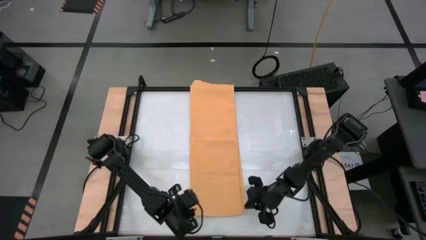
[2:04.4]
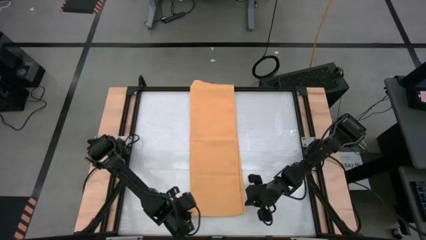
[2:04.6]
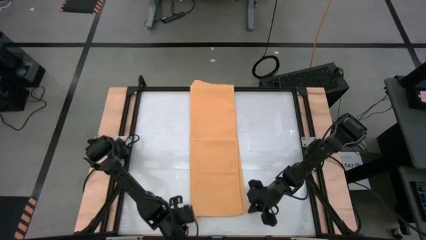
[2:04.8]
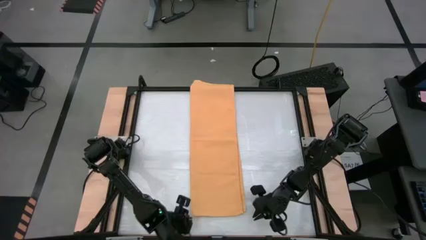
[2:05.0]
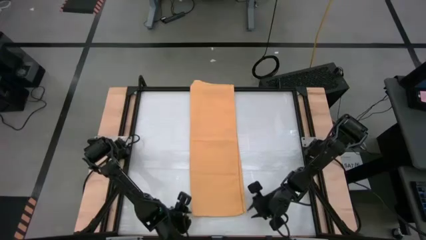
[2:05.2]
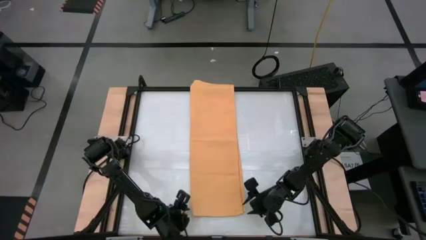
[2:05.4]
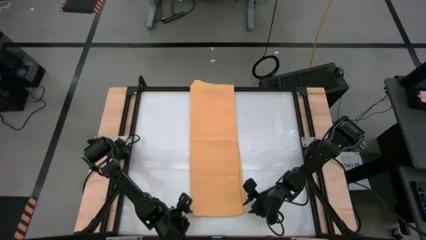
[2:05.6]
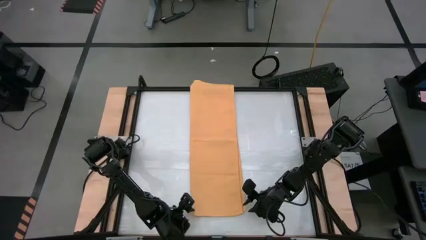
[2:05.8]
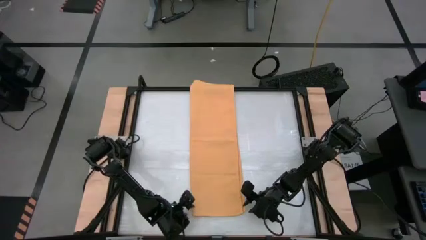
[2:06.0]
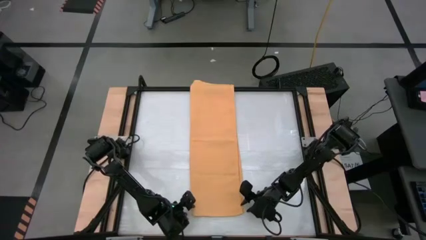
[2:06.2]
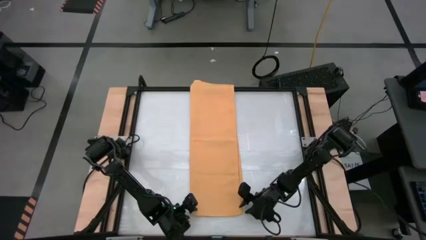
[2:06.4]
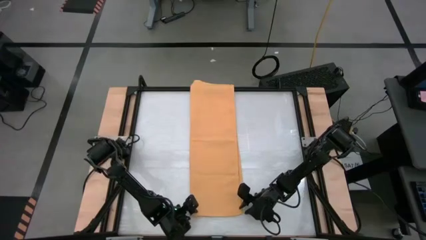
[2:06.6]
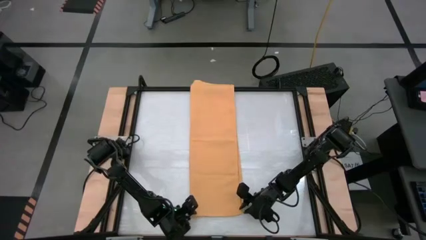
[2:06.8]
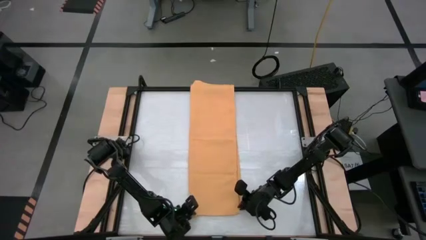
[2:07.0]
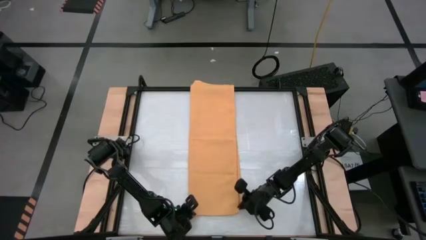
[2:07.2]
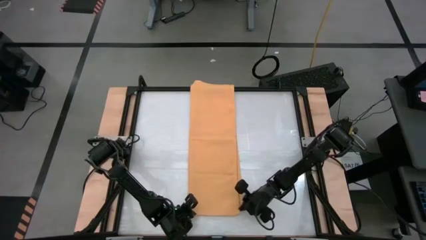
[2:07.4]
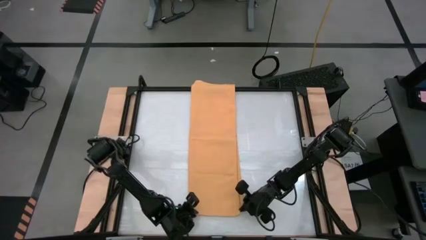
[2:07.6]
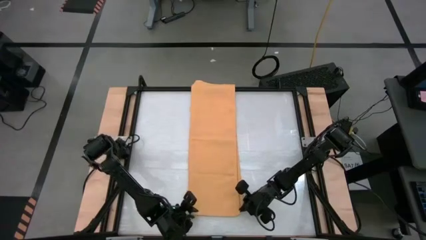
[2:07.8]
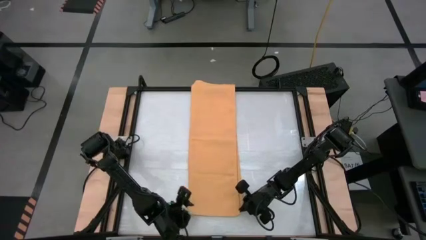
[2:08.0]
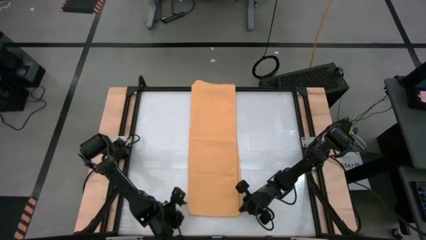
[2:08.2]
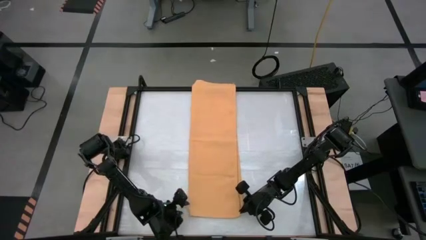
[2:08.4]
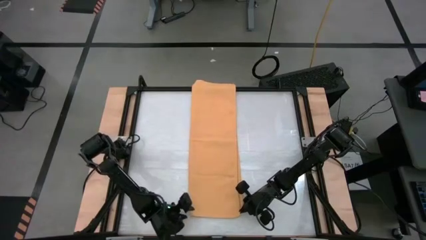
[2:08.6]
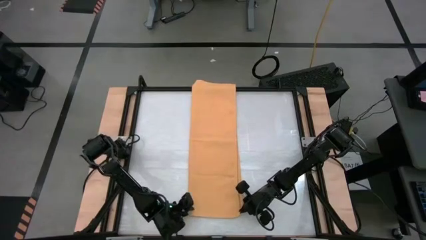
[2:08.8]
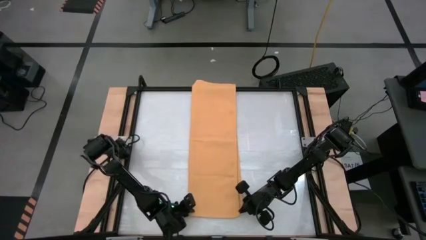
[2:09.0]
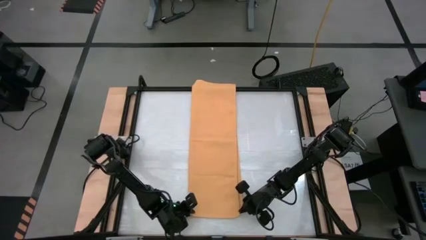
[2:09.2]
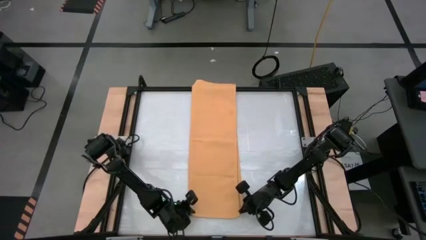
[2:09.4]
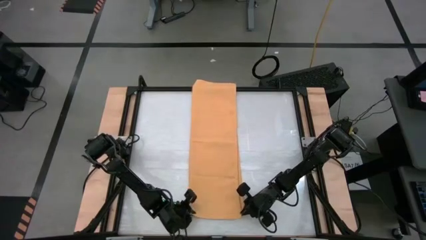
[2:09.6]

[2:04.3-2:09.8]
Task: Roll towel into tight, uniform cylinder
Roll the yellow towel

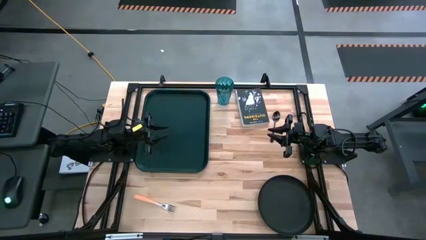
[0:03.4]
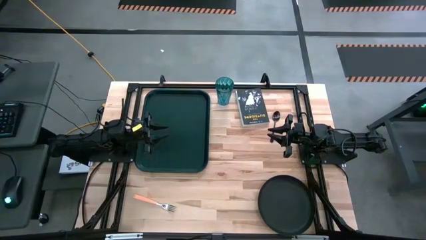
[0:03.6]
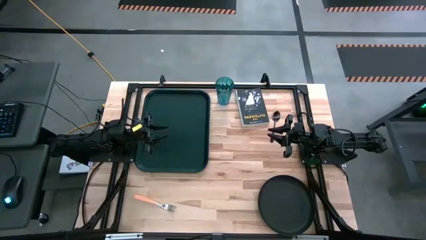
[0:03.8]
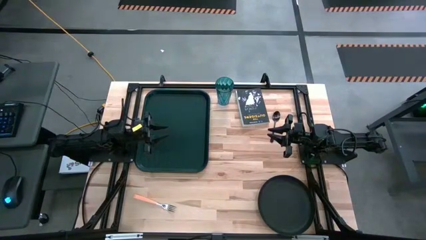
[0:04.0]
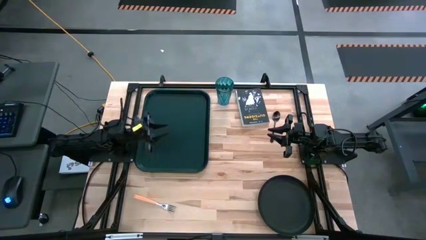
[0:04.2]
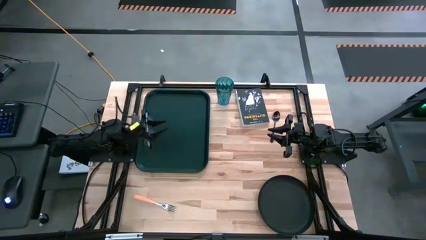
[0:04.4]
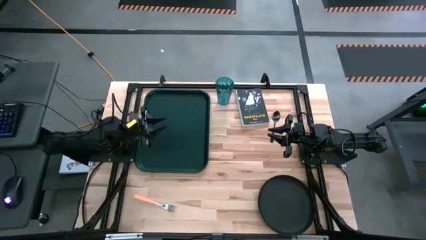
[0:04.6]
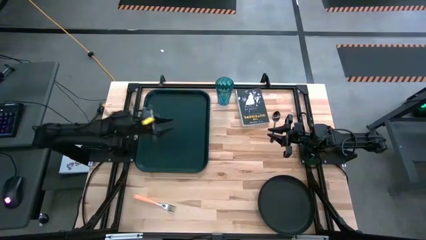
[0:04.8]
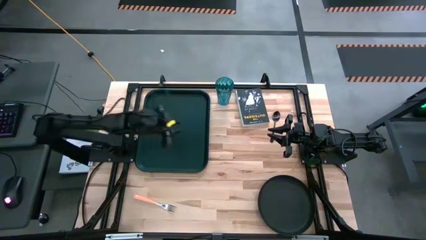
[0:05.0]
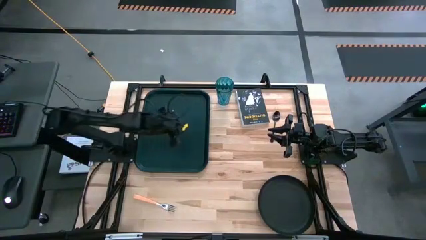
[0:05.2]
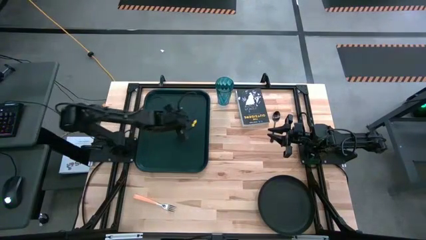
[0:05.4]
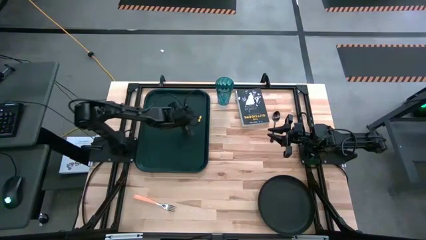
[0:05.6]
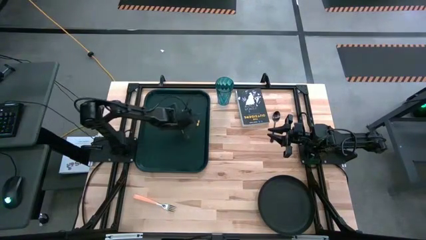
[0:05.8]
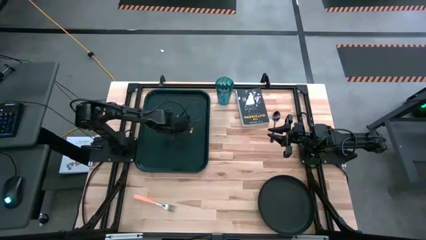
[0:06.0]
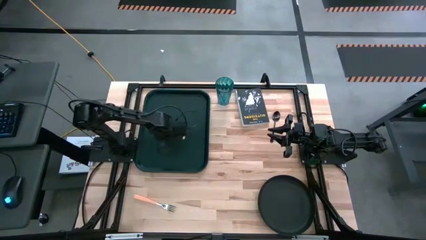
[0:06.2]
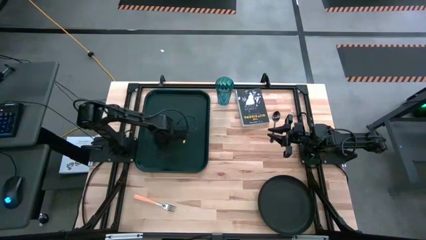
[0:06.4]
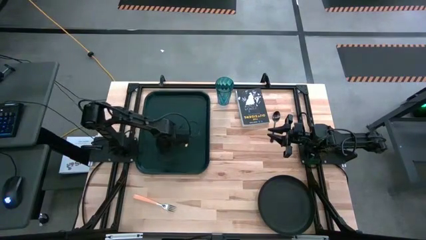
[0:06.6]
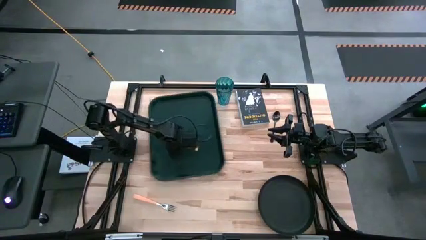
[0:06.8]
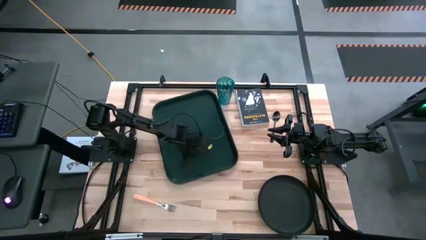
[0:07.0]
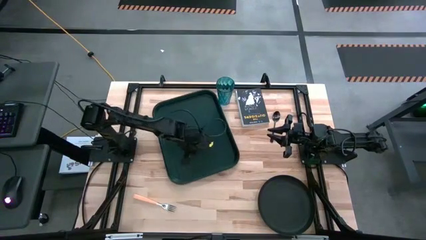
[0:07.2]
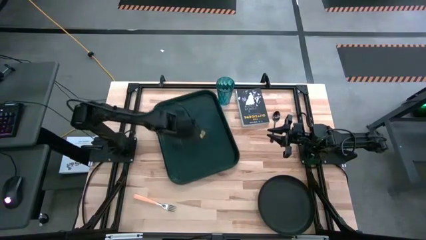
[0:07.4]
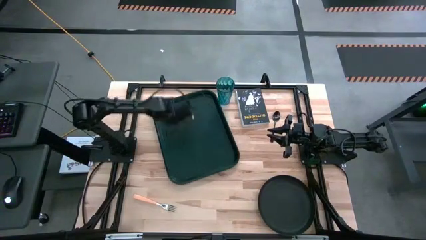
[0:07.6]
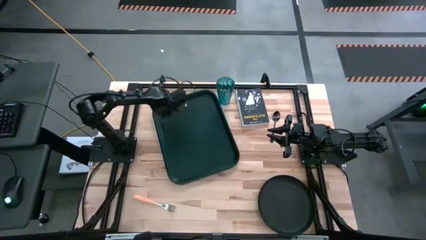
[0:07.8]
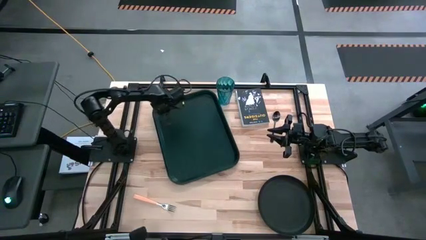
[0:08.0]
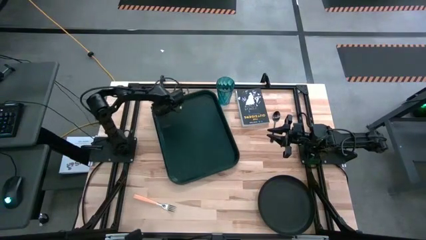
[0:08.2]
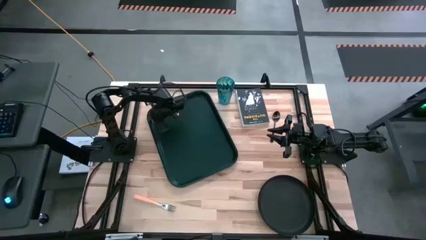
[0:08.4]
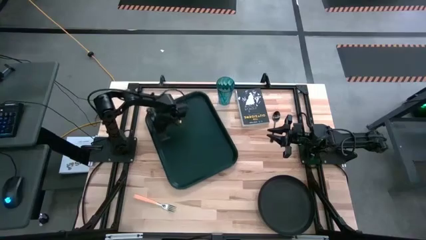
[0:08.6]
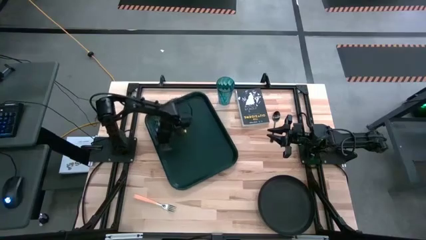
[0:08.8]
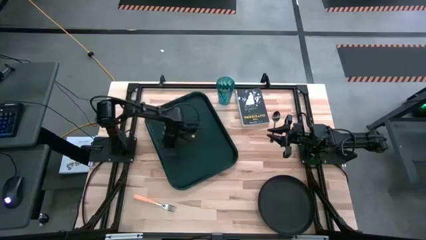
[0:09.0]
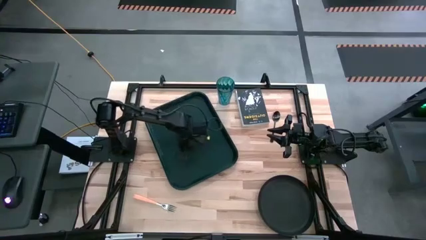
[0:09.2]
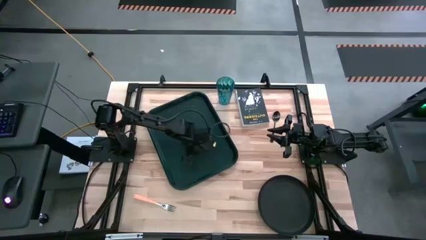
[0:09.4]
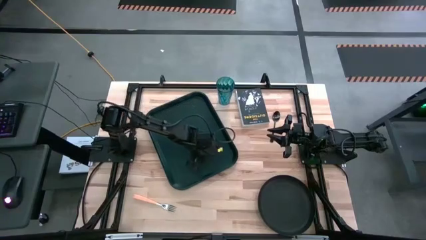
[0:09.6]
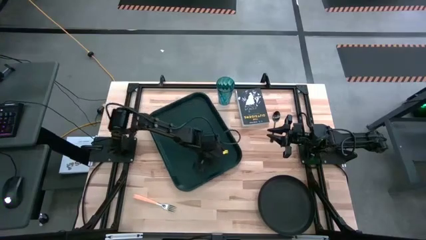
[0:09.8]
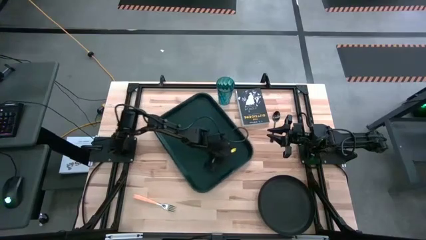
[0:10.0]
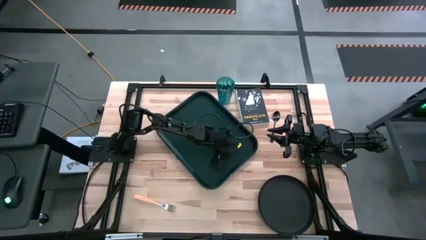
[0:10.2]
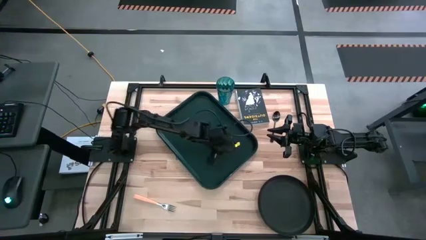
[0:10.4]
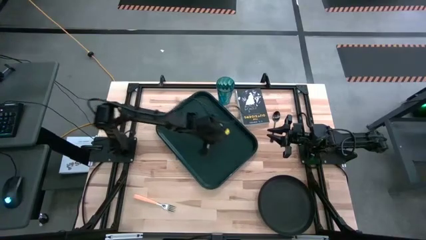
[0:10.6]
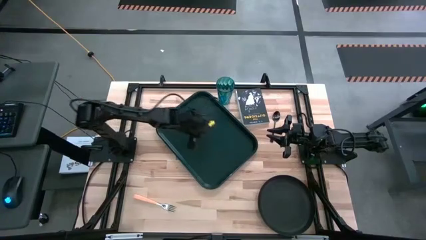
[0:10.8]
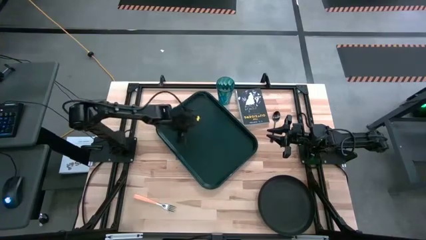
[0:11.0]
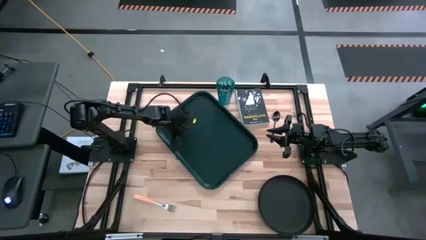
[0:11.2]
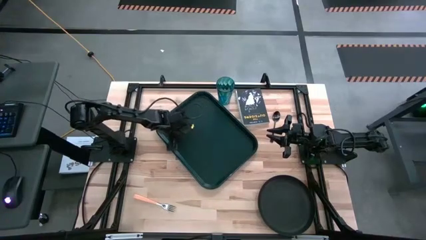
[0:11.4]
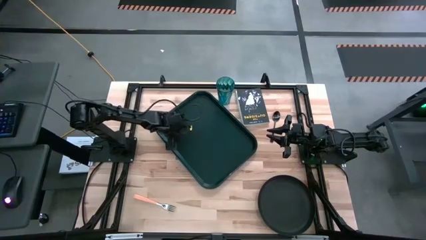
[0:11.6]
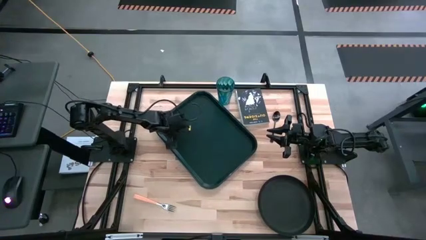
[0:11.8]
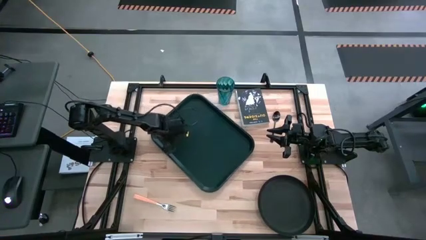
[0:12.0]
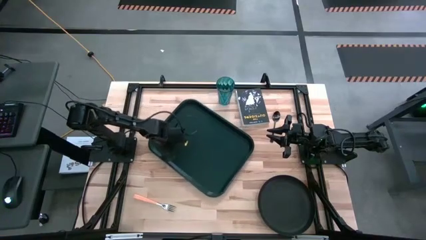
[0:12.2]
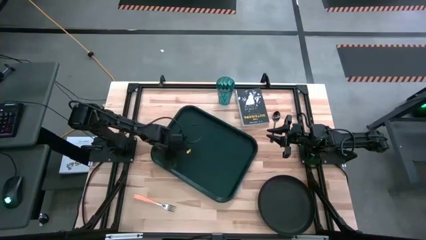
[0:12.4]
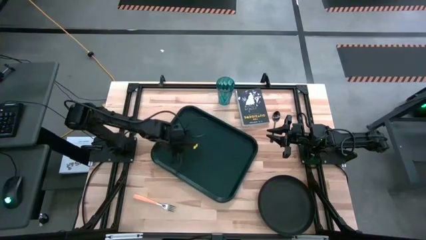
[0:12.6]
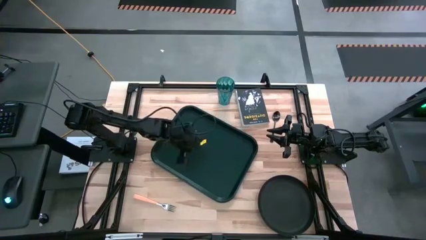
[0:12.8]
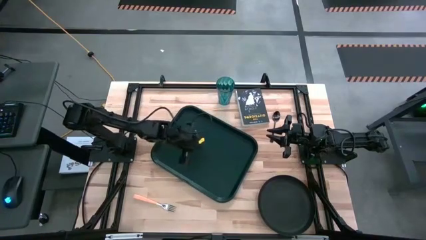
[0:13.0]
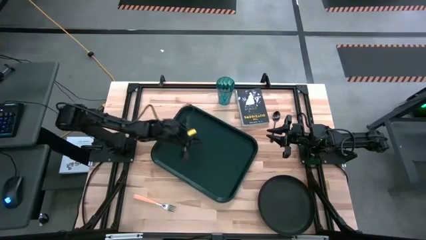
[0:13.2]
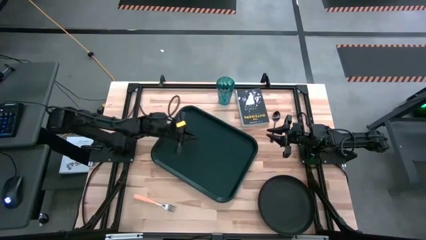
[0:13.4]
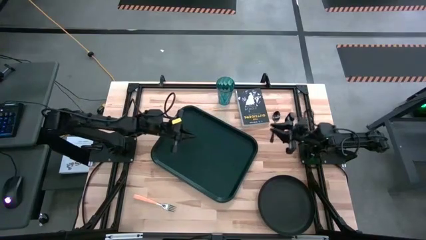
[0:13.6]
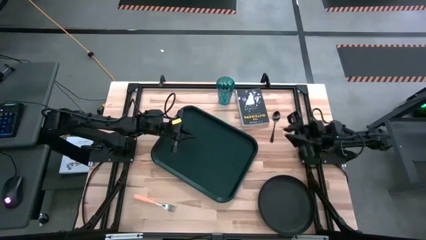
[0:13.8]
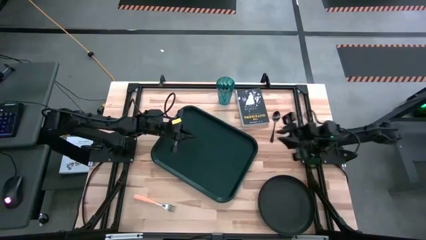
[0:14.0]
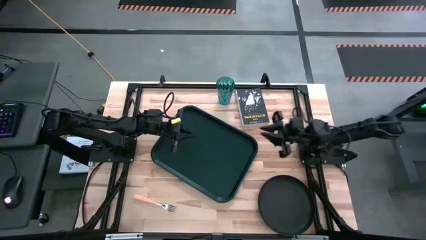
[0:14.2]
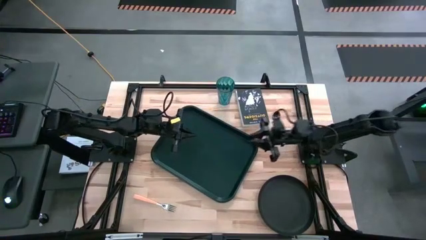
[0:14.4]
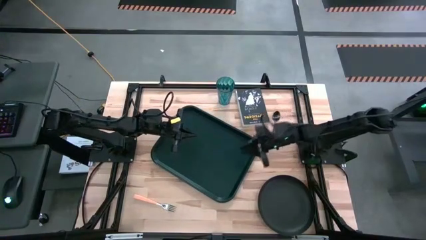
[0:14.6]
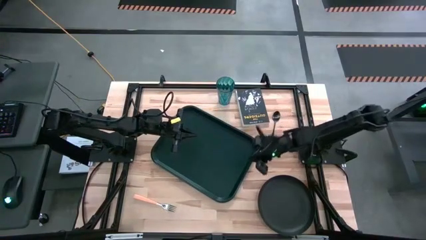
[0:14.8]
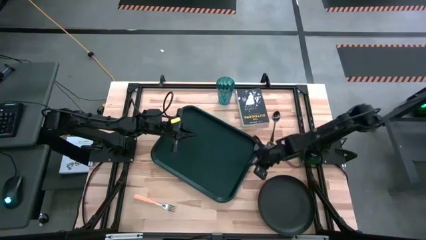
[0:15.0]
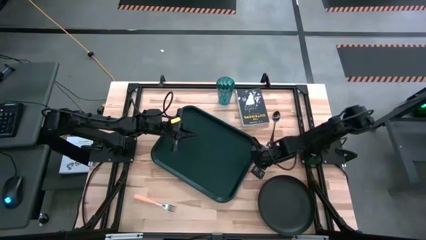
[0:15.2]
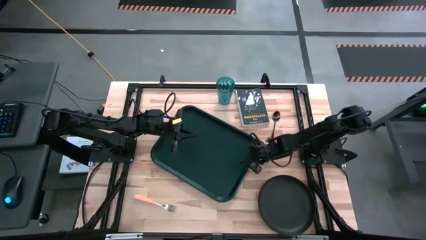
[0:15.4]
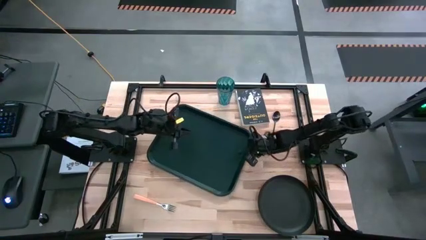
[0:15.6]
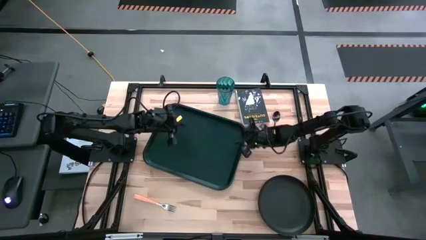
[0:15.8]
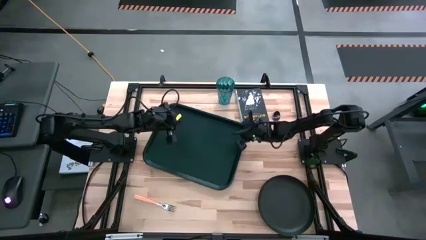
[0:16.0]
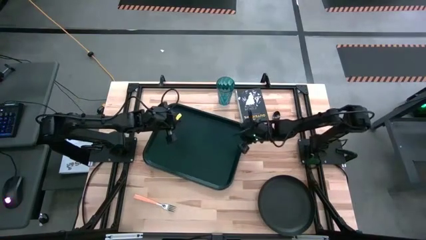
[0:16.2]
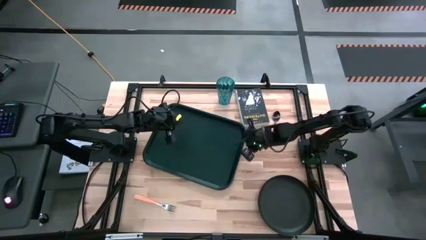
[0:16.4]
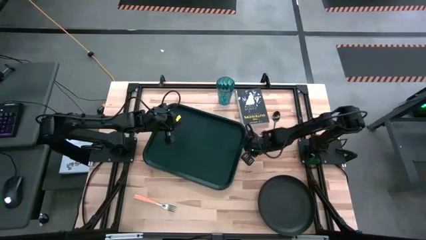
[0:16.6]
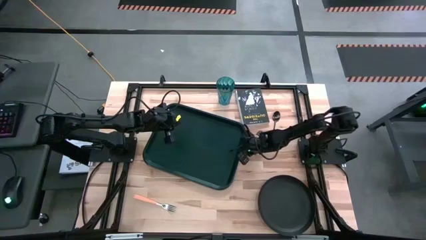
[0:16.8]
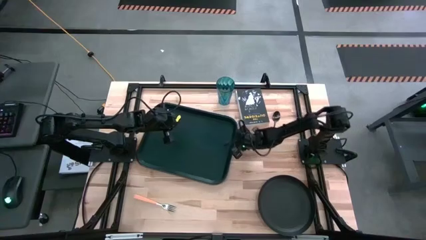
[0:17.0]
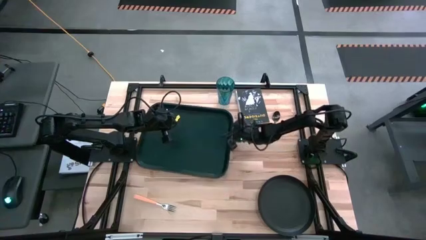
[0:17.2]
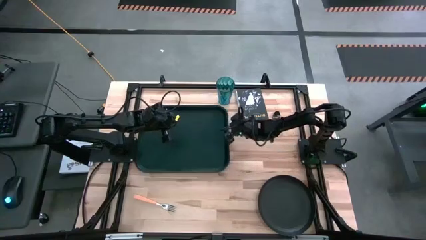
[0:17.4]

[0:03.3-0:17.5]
Task: Pick and place plate/cup/fork/spoon on tray
Adjust the black tray on the table
